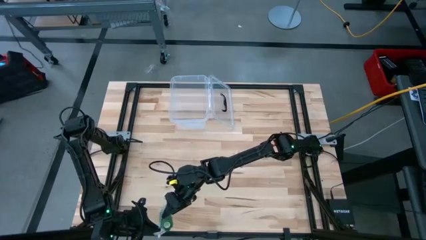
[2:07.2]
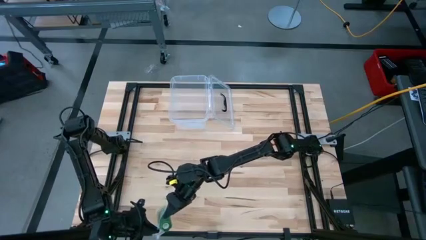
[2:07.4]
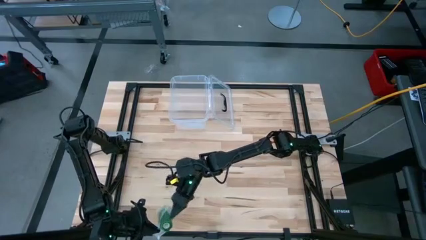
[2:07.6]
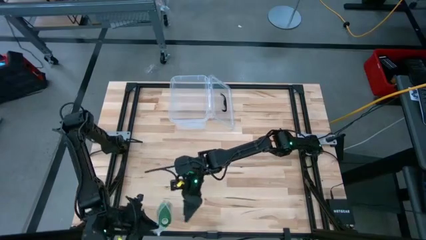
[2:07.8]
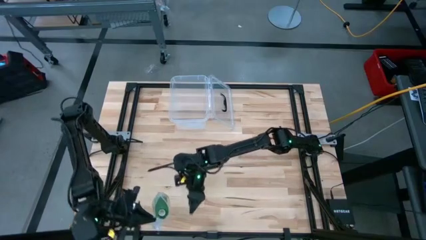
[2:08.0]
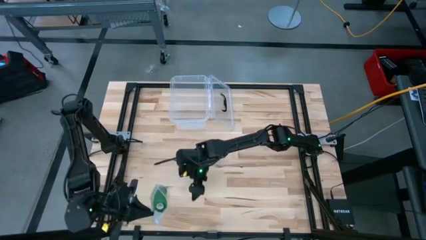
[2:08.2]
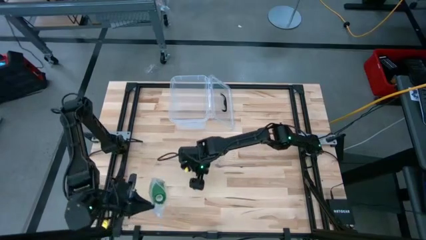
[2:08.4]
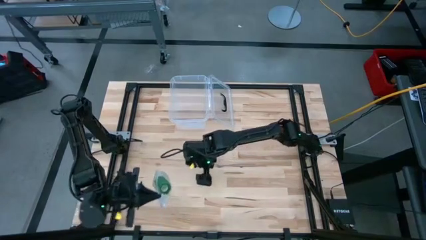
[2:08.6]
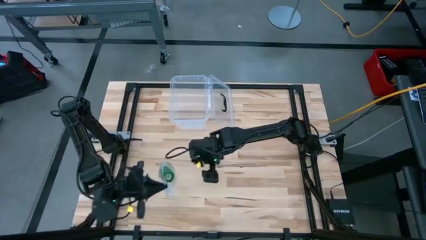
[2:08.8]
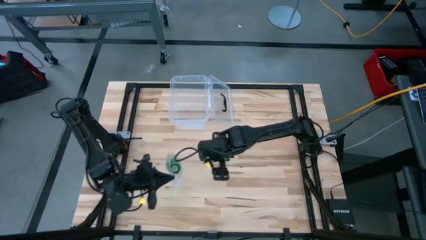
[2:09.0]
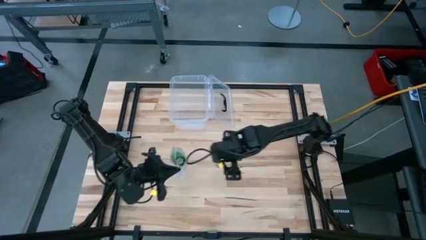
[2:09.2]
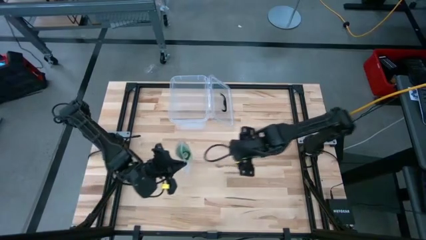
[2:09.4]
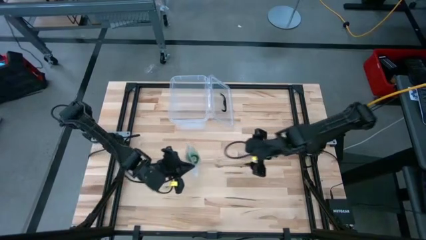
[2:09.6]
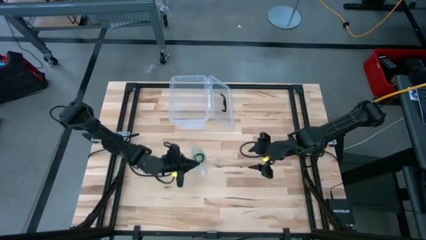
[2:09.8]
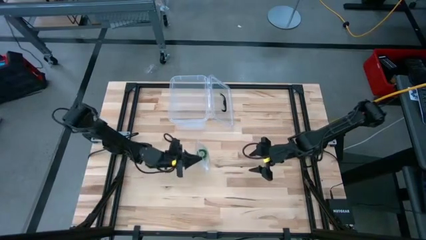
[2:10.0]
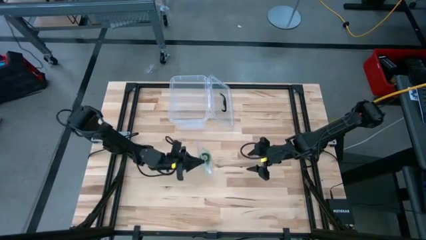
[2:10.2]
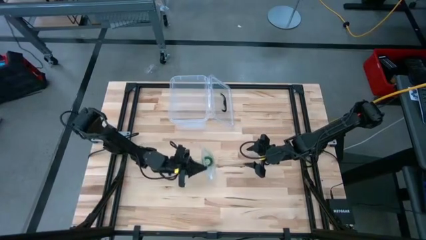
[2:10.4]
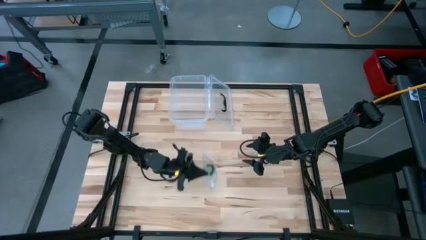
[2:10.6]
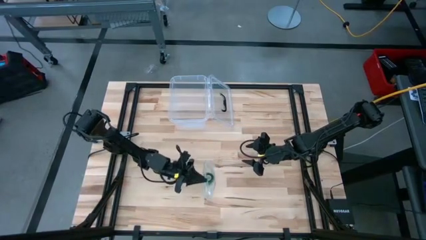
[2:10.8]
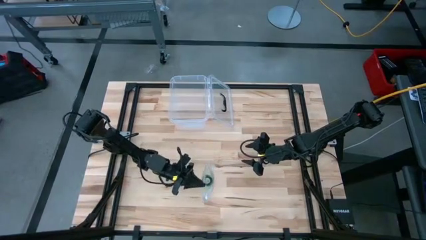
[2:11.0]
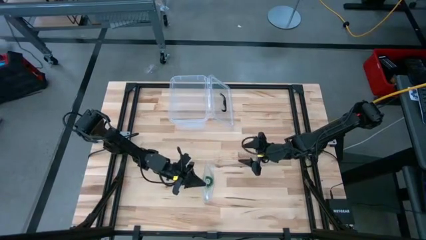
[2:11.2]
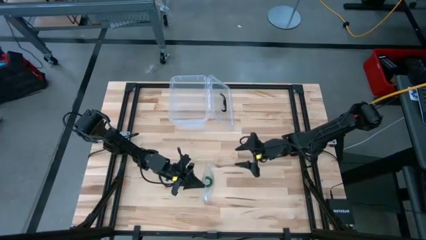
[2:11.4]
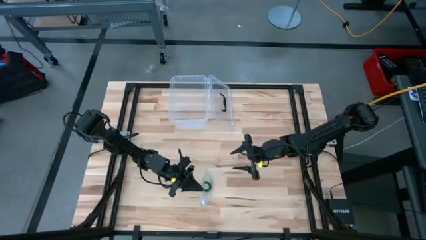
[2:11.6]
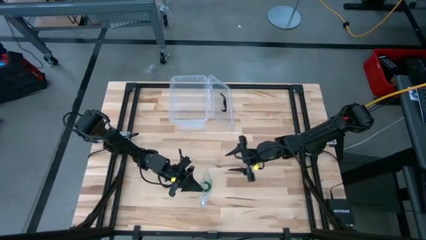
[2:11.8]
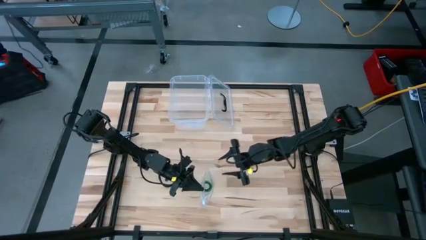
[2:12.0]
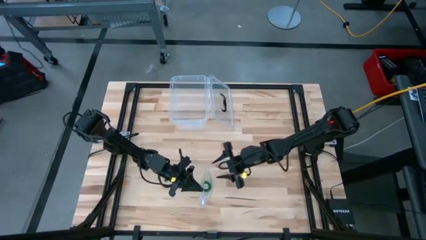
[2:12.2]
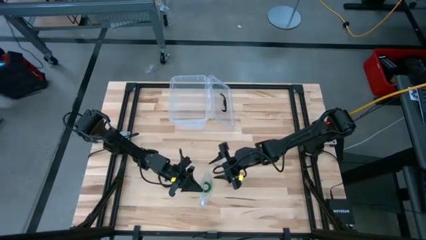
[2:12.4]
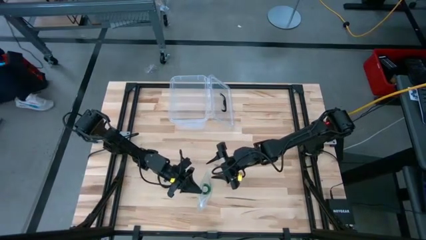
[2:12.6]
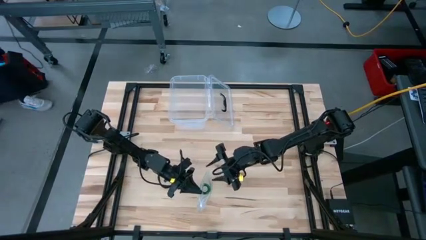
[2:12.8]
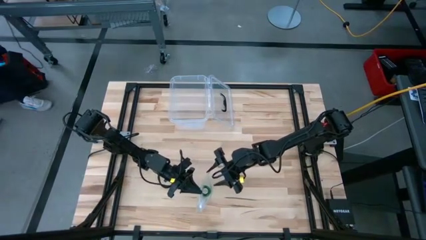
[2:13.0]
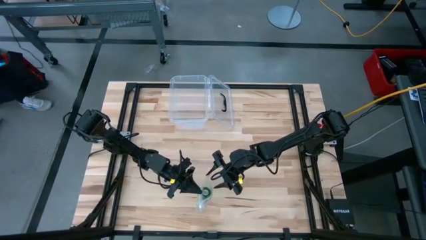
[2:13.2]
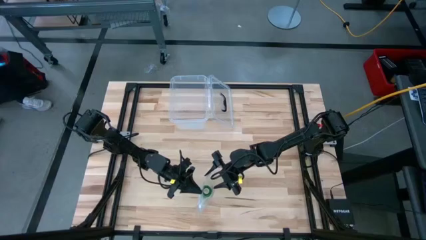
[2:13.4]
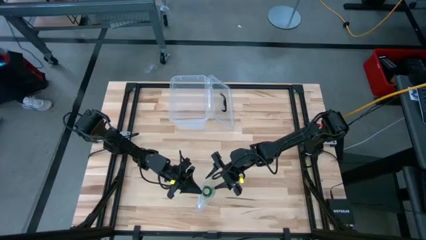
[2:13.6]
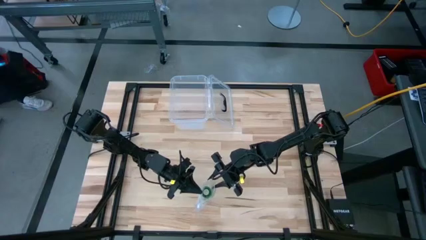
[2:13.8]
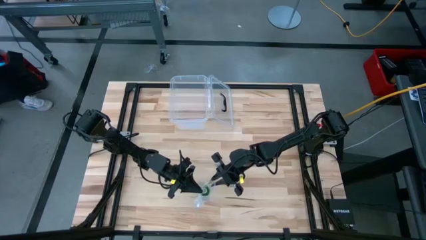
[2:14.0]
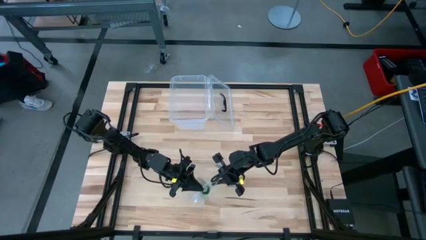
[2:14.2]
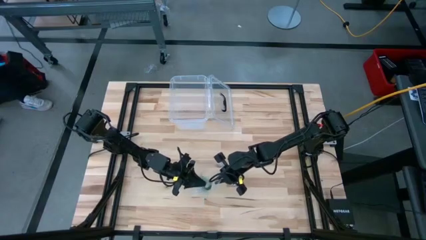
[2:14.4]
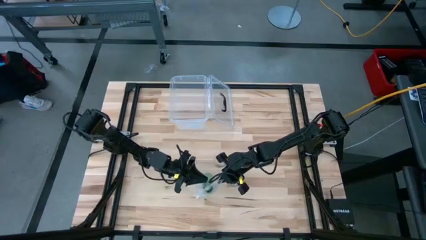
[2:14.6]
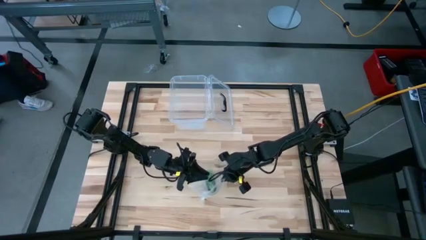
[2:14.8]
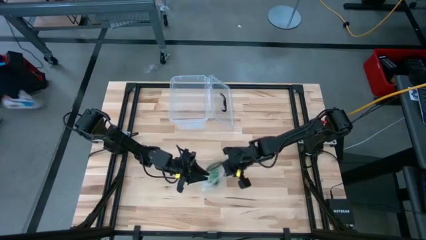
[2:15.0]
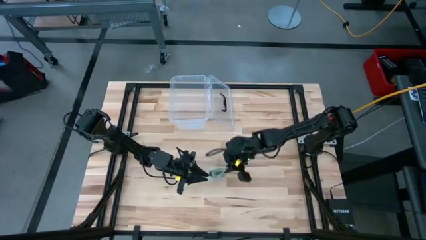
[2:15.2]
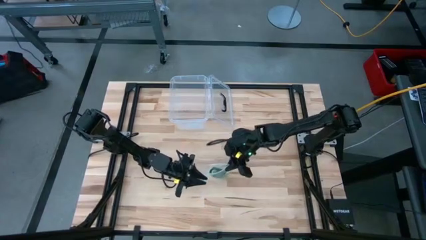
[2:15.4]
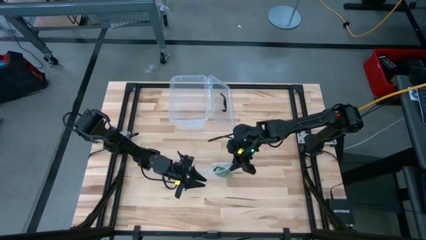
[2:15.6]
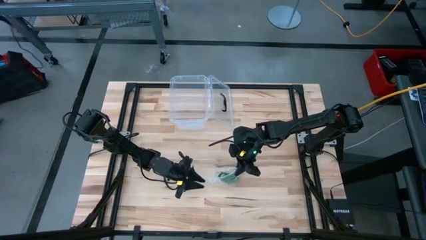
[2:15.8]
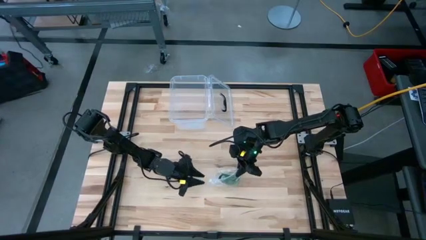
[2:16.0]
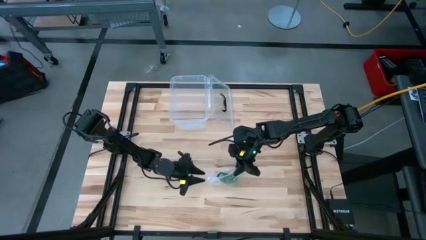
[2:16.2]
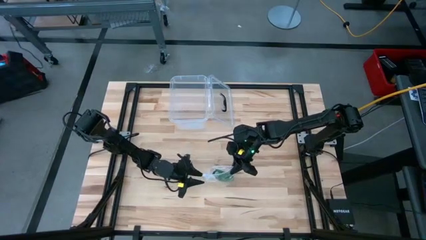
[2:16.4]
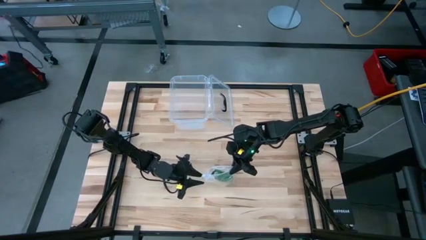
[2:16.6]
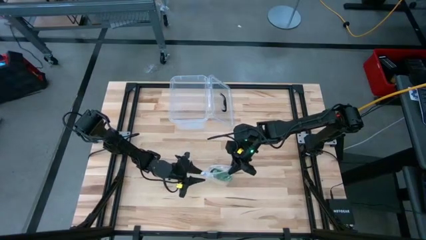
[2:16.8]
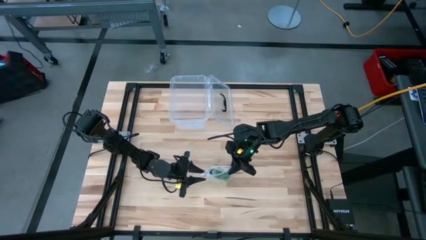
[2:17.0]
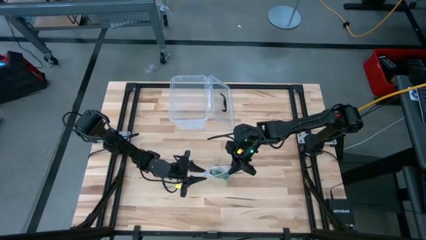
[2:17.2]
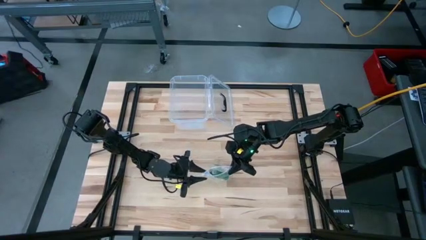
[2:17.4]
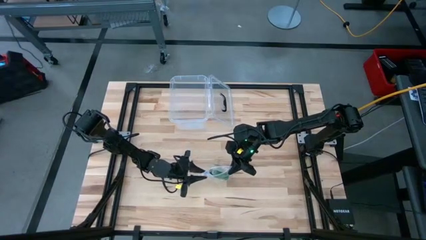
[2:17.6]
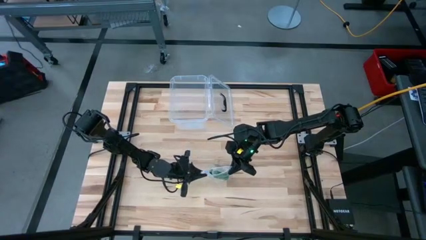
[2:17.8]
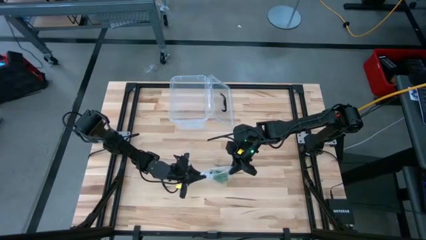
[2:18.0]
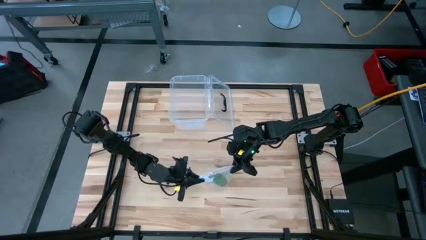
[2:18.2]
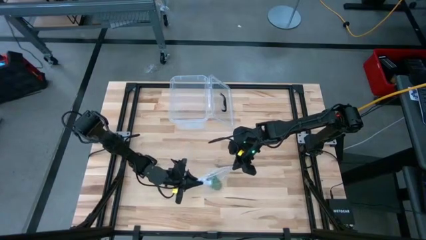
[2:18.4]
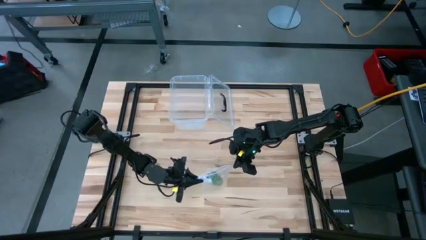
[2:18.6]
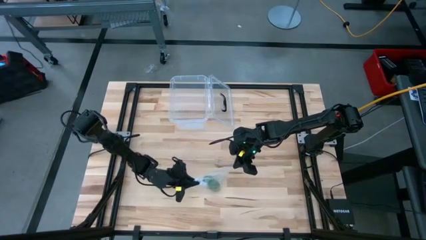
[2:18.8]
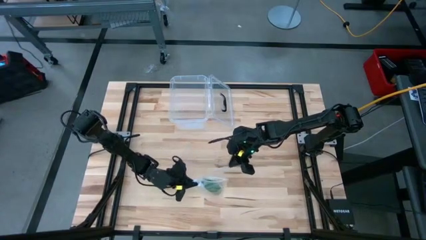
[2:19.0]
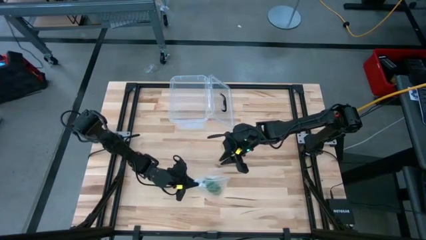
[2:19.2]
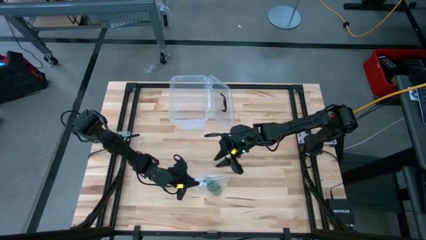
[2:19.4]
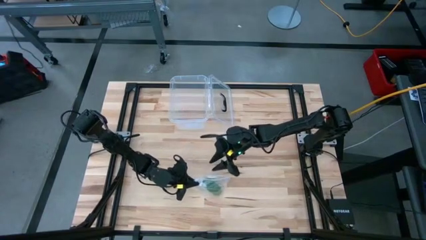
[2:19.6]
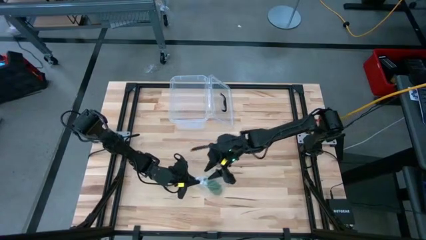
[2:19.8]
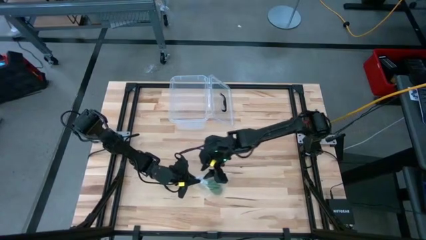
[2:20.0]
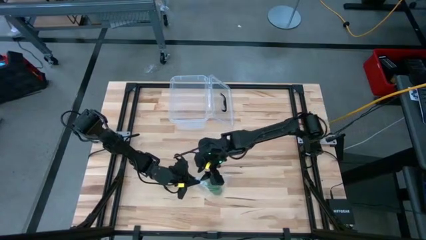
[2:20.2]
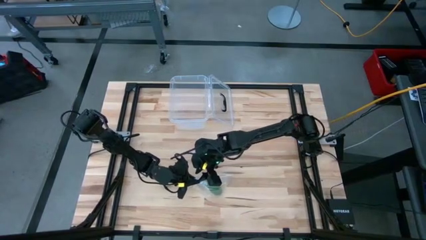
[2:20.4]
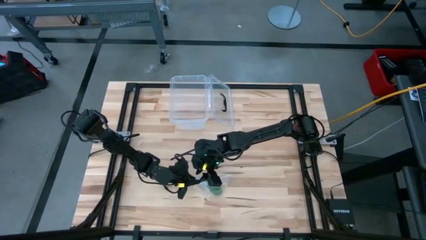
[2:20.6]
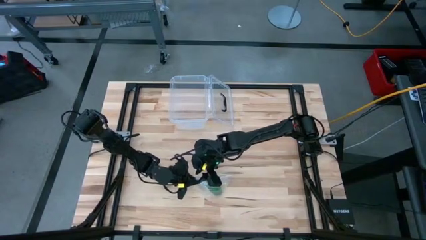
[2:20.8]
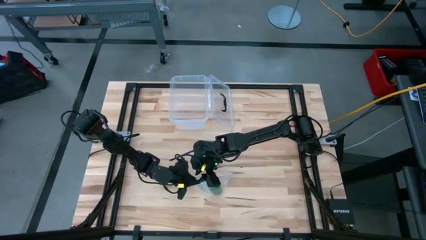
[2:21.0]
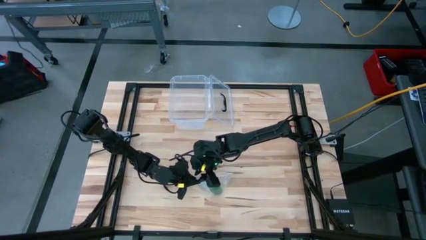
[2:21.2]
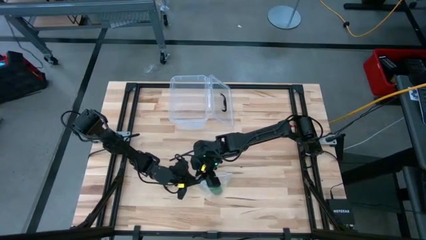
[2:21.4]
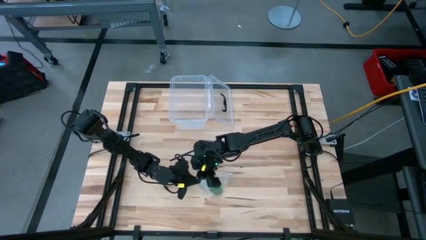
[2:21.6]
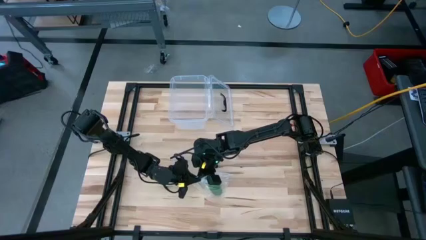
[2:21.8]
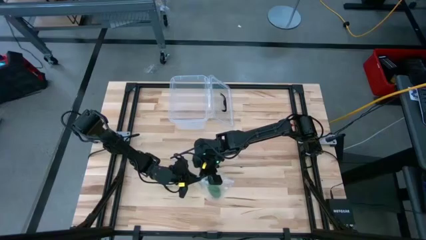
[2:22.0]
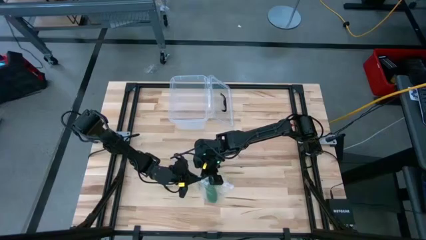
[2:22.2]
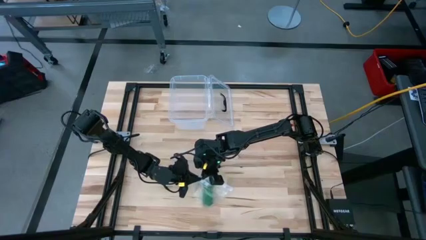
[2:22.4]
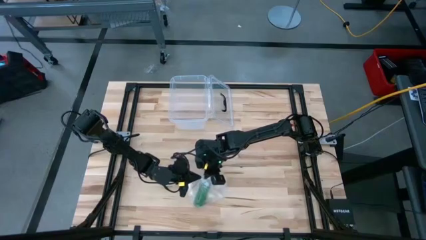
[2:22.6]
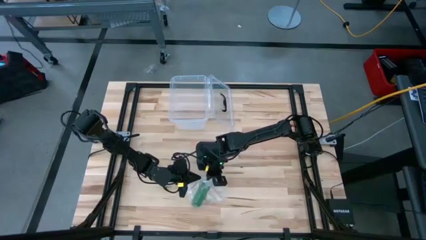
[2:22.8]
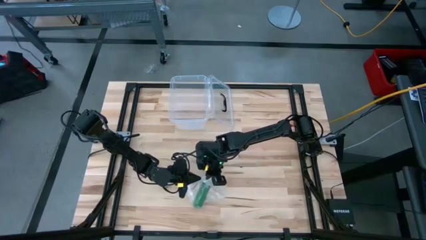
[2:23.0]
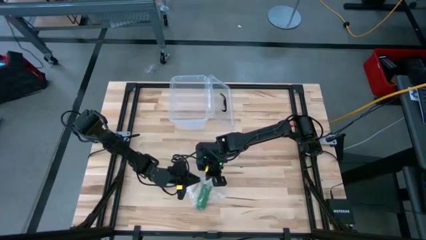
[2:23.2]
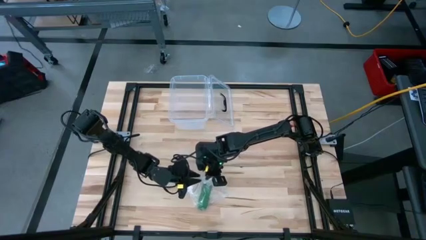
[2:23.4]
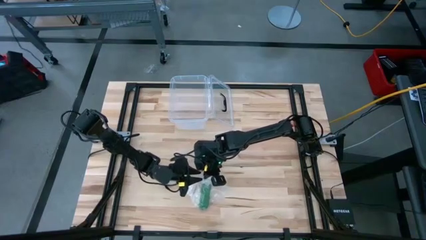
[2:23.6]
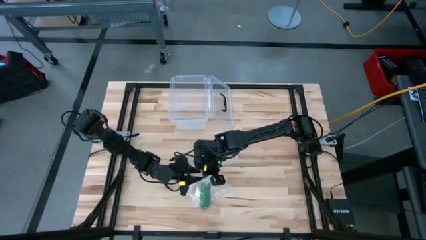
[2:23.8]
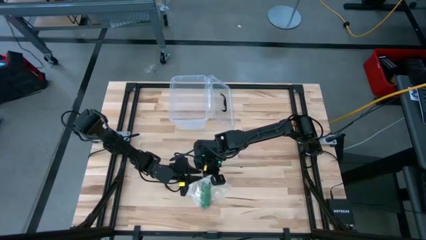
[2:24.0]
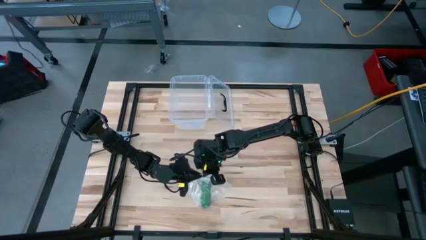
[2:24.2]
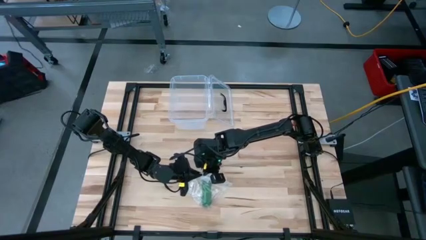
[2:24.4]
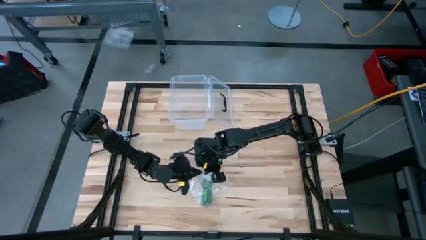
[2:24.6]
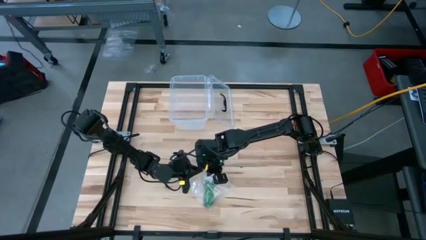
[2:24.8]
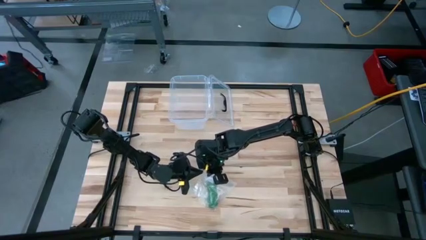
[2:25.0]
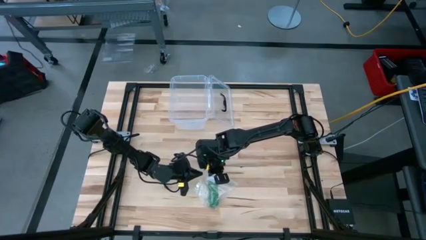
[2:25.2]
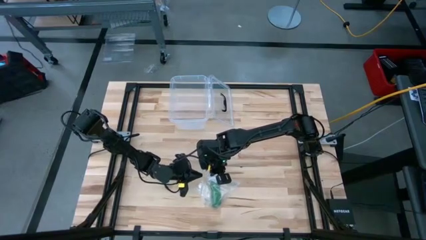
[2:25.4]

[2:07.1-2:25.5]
Task: Roll bandage
Close the transparent zip bag
